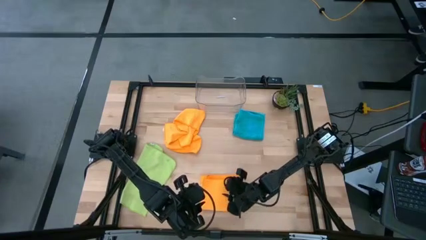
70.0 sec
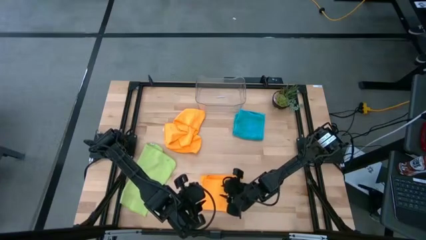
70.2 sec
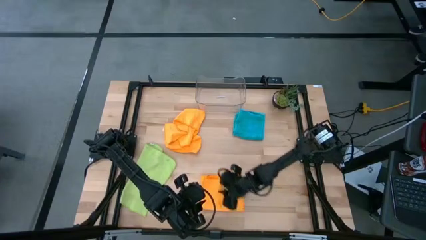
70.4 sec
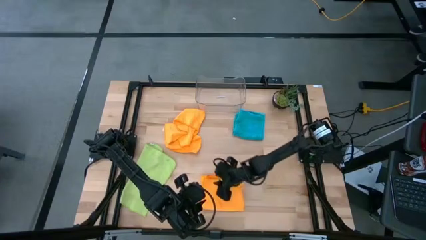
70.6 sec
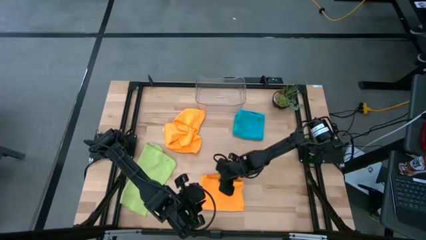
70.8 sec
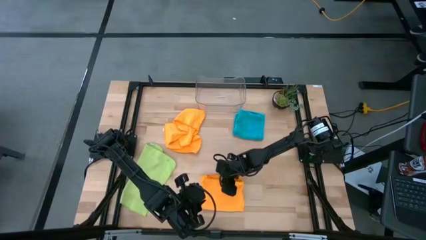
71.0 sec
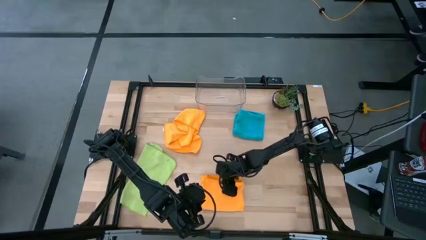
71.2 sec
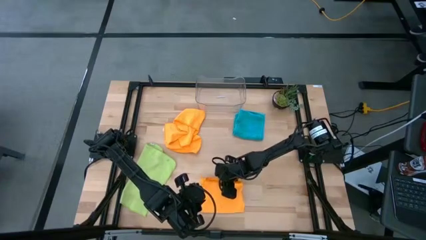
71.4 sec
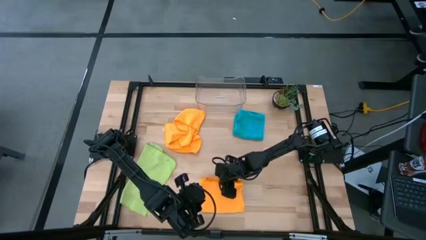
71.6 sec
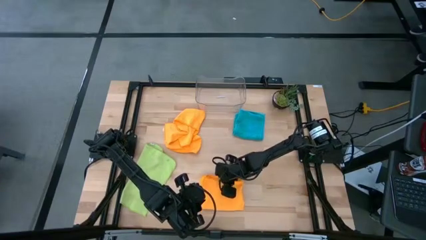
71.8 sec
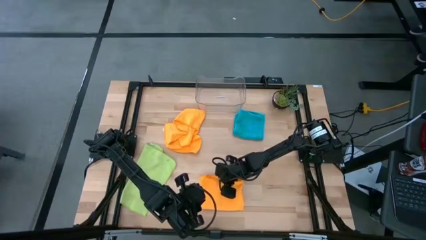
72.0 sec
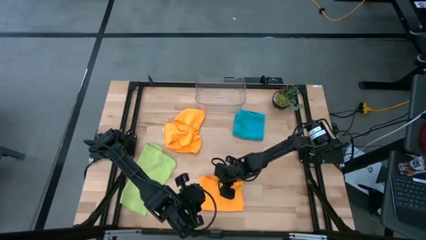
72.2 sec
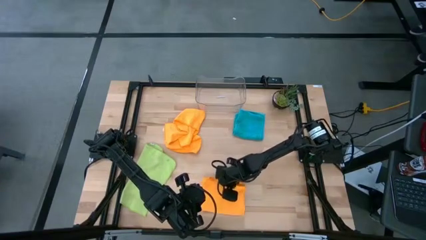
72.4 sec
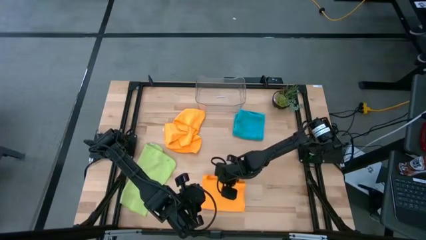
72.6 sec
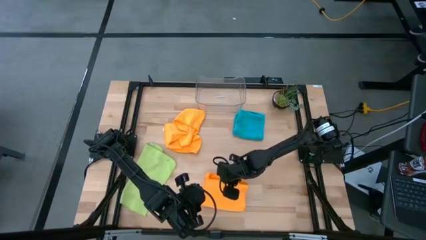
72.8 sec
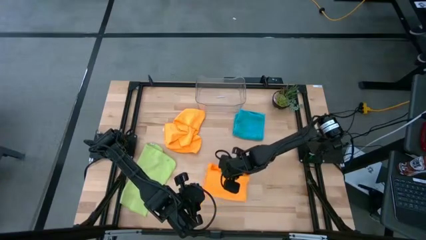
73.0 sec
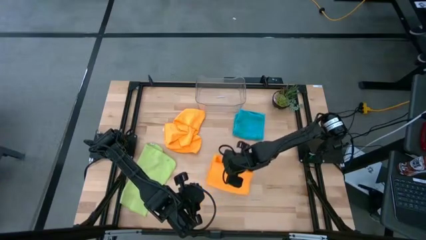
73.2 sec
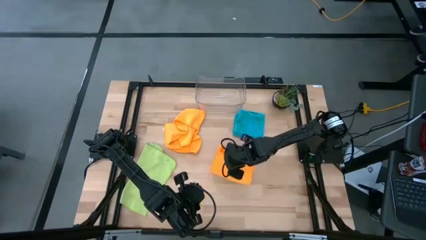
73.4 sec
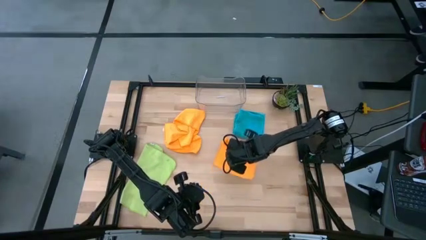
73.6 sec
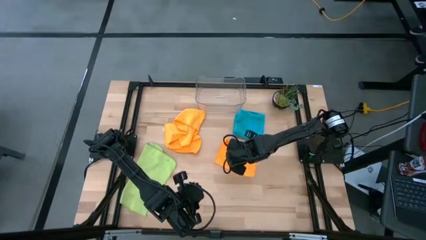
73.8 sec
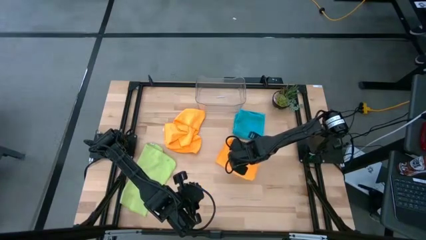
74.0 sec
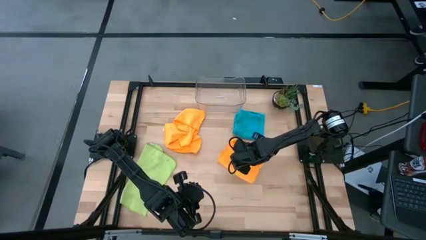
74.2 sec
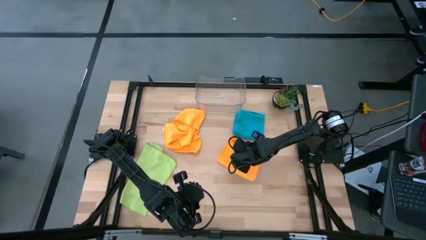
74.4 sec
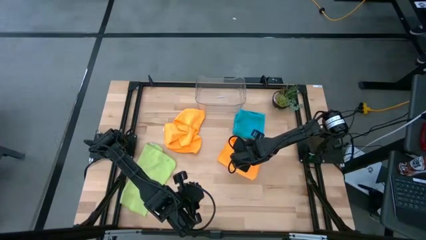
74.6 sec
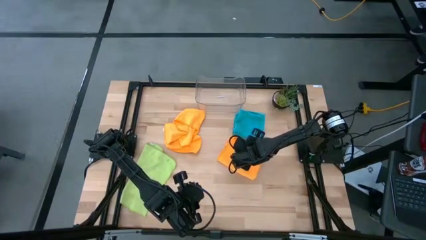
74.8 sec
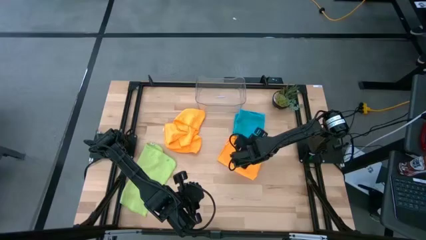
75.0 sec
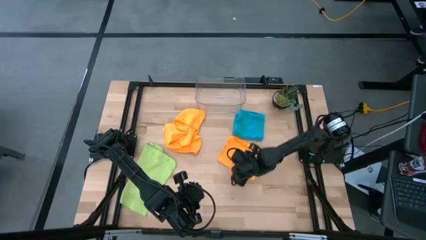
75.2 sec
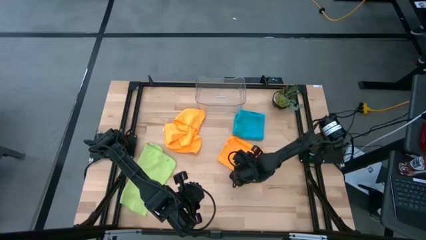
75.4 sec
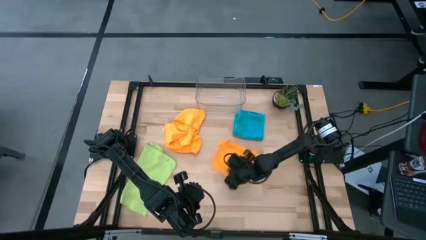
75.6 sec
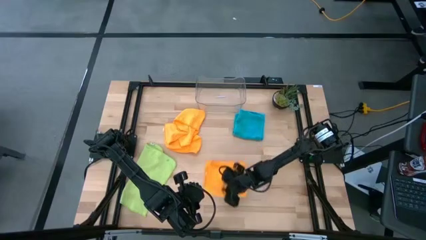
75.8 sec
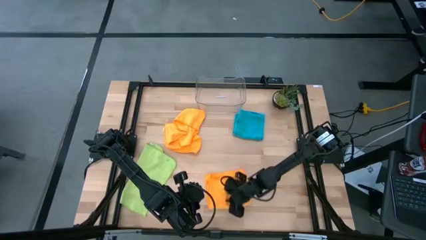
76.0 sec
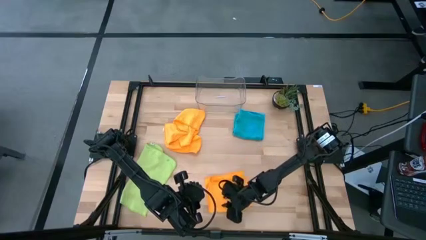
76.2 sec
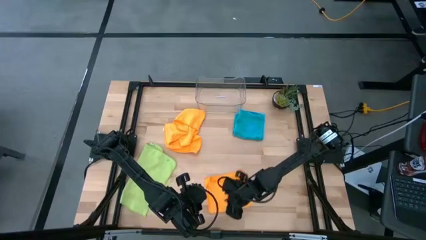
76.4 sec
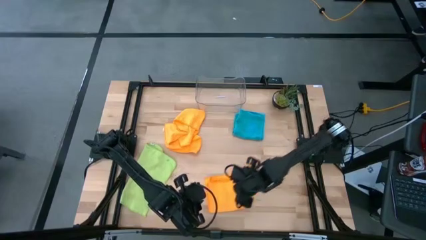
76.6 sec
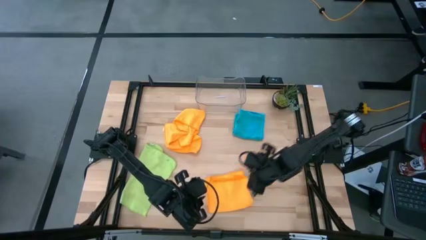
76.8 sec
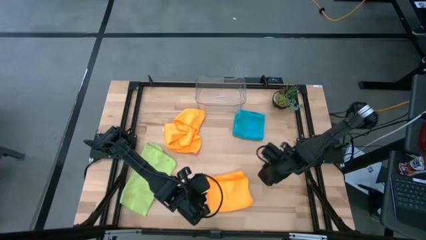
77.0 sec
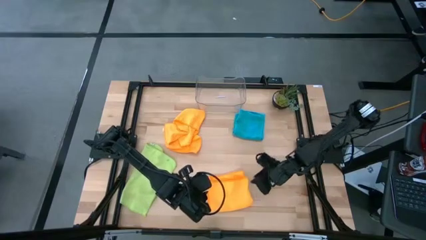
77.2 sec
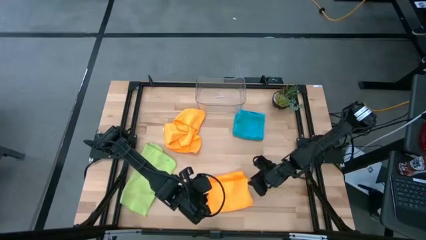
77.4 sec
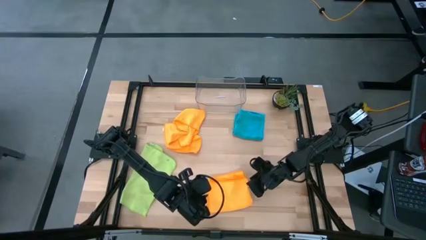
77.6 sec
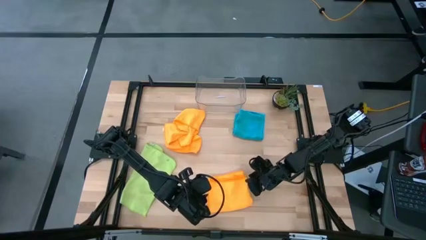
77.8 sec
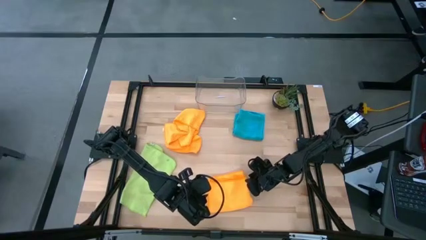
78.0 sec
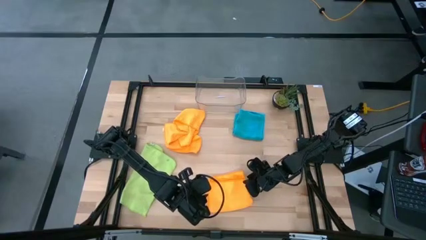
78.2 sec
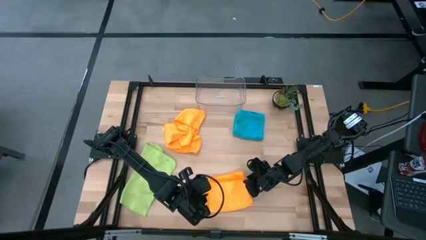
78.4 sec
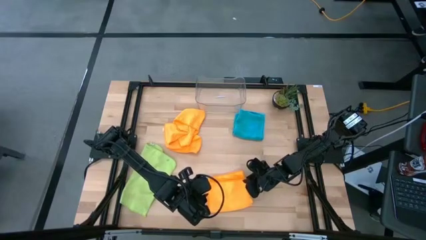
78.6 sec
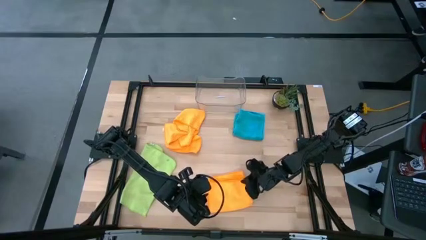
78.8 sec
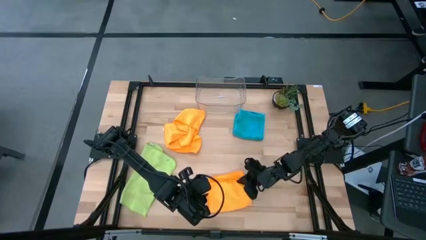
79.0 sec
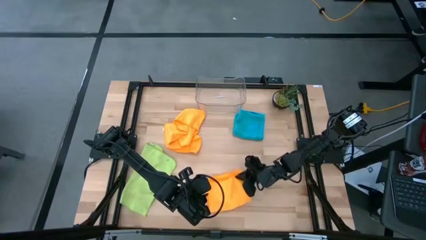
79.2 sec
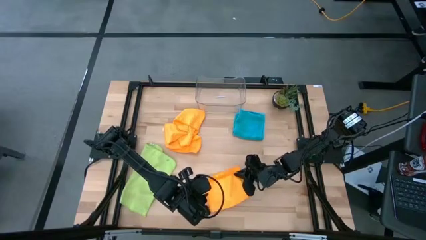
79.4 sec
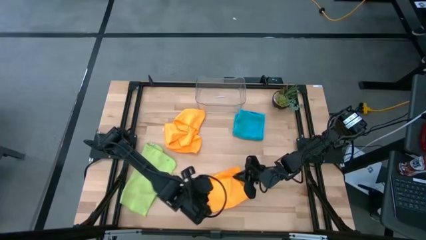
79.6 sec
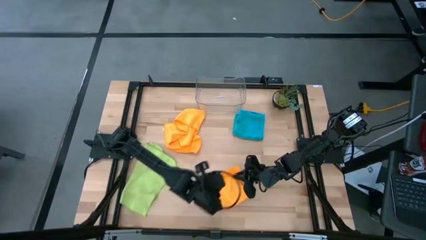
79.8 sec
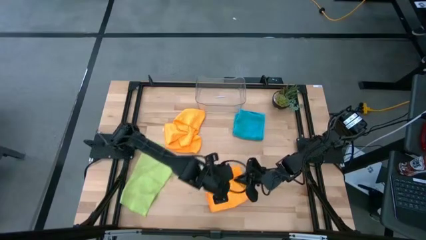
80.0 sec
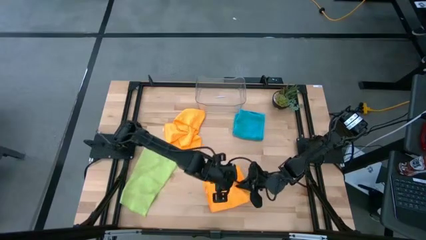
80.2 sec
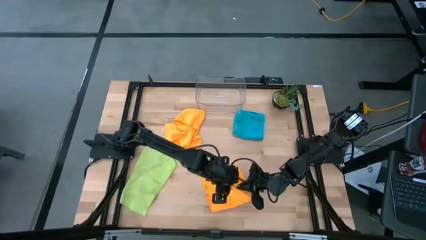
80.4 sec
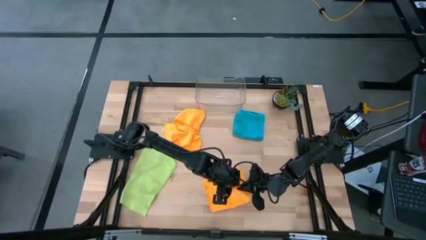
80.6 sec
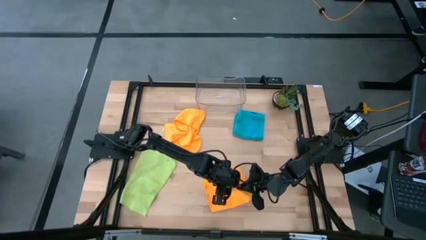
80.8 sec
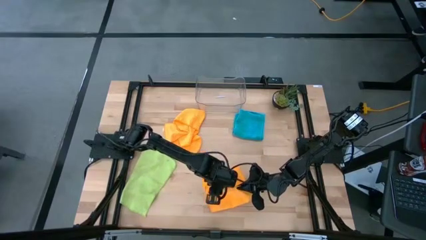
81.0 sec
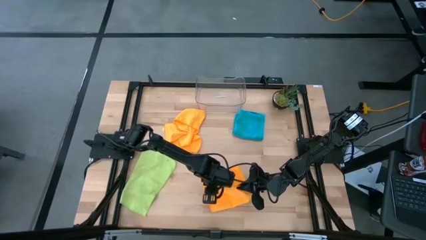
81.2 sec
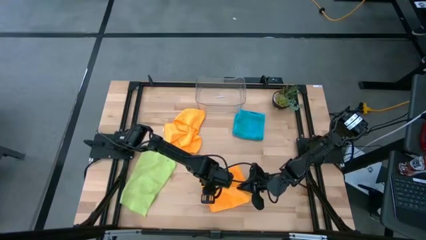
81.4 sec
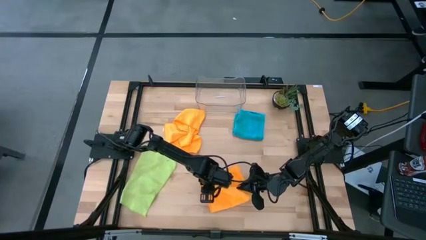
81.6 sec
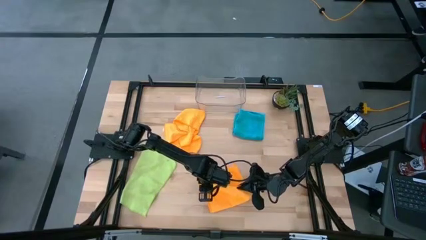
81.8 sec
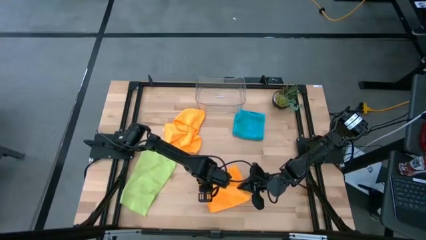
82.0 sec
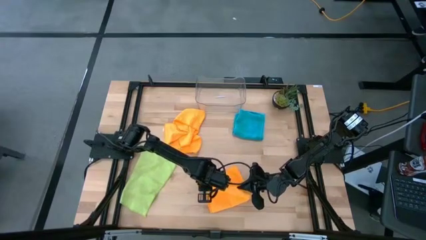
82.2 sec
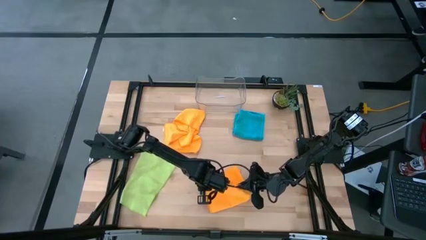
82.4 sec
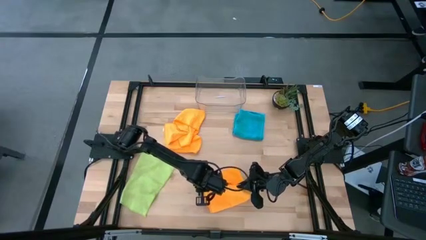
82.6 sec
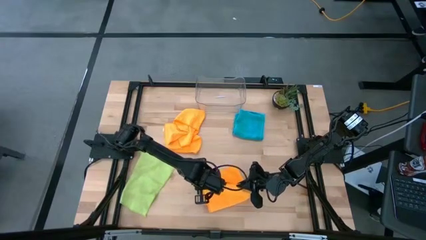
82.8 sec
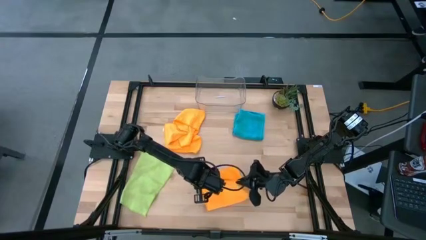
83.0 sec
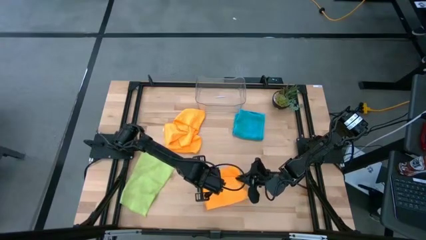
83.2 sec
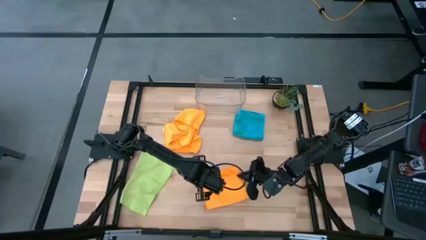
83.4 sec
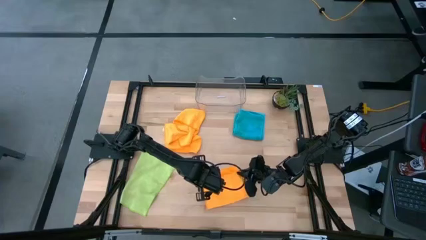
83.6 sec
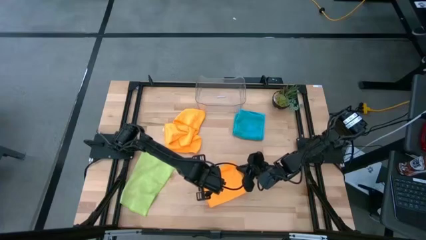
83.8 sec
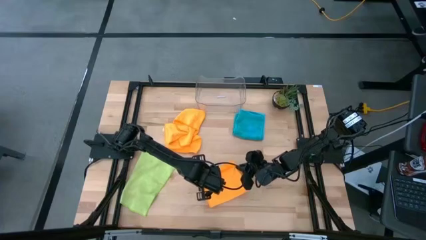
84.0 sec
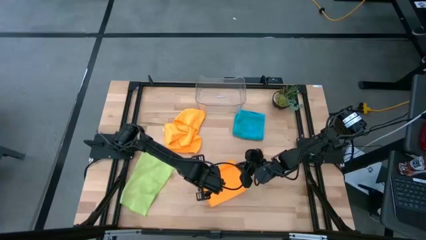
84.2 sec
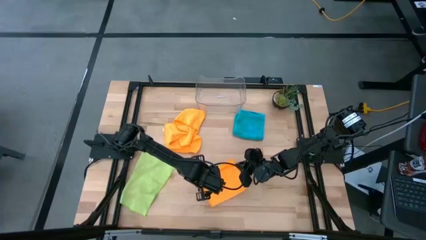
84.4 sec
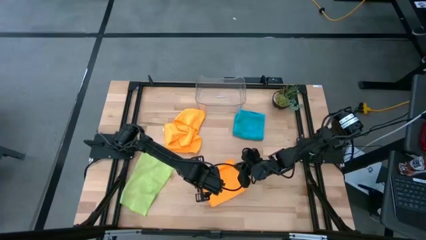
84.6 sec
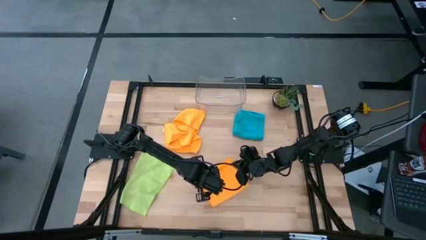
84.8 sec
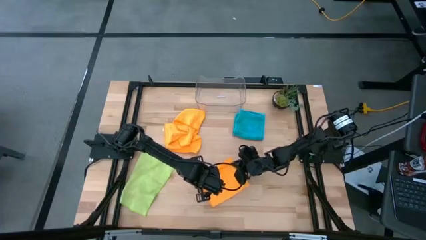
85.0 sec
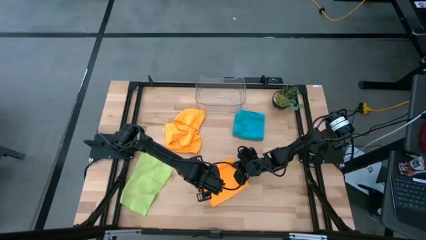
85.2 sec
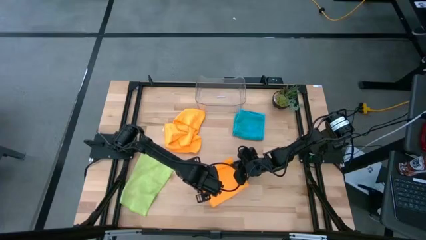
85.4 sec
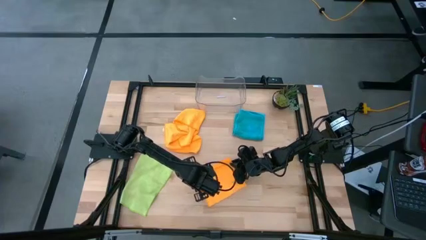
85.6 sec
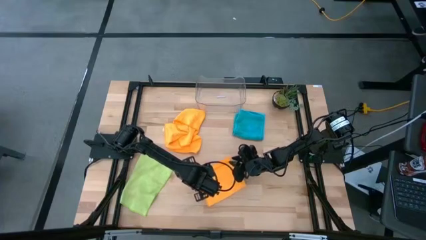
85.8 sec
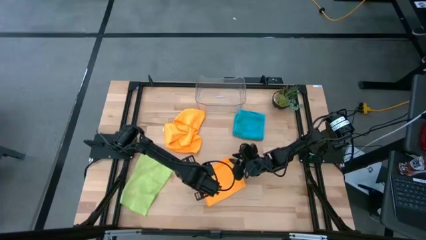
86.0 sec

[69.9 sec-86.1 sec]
Task: Fold microfiber towels
Fold the bottom orange microfiber cloth
